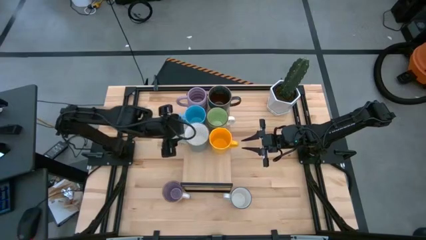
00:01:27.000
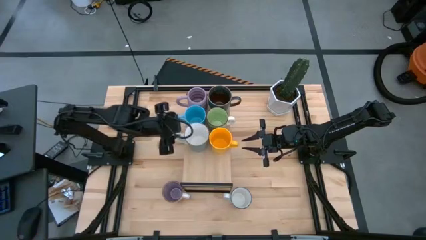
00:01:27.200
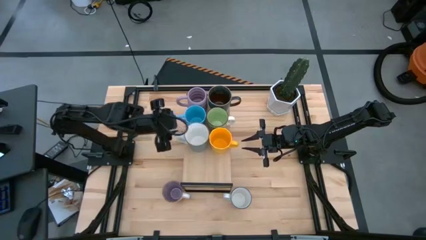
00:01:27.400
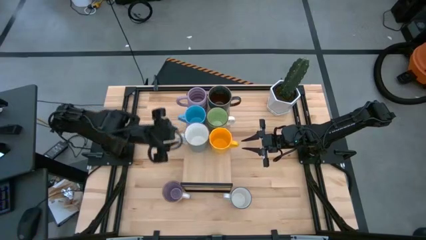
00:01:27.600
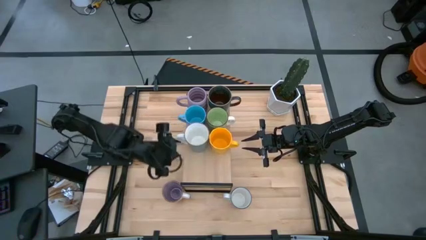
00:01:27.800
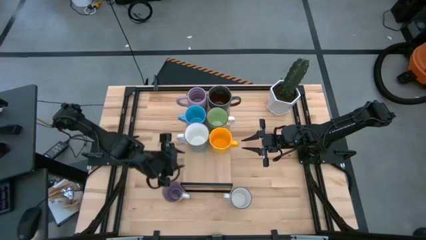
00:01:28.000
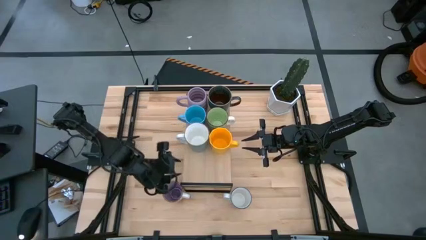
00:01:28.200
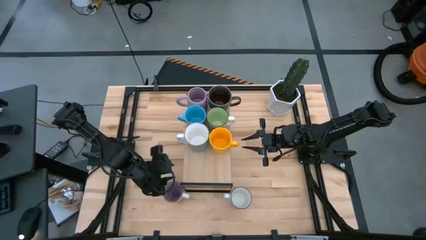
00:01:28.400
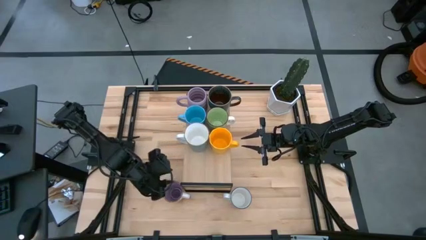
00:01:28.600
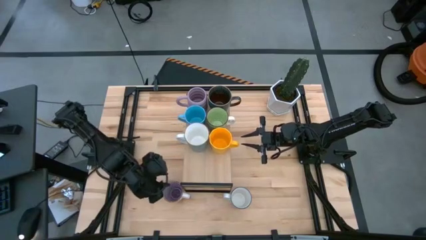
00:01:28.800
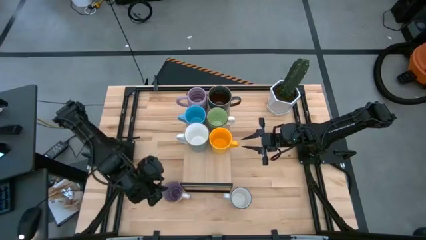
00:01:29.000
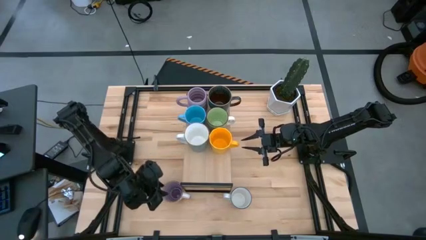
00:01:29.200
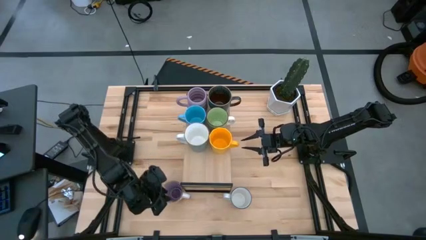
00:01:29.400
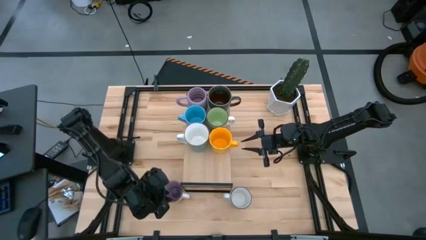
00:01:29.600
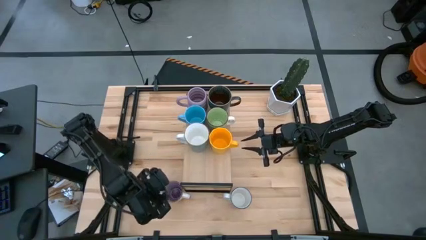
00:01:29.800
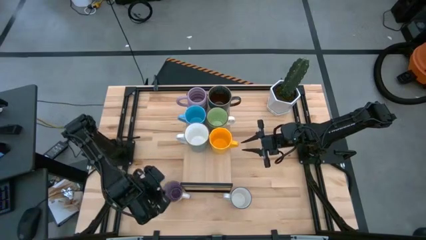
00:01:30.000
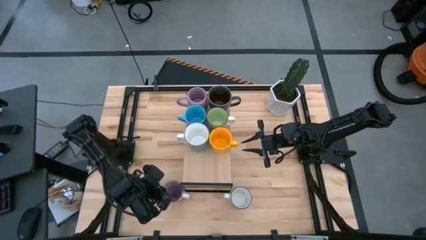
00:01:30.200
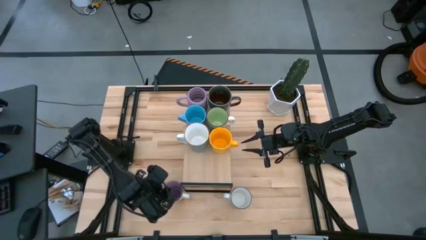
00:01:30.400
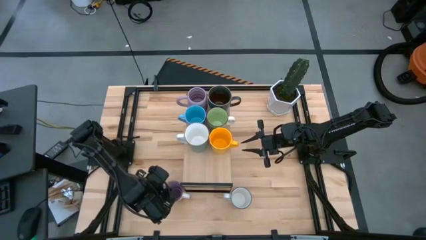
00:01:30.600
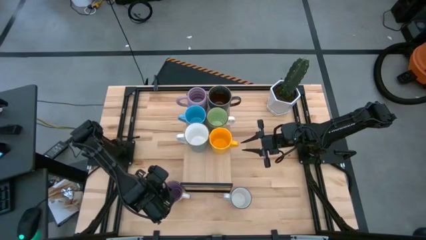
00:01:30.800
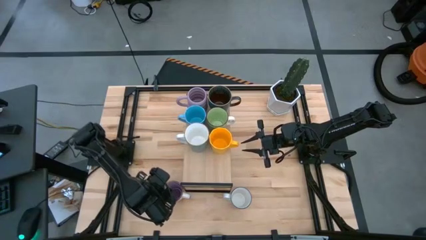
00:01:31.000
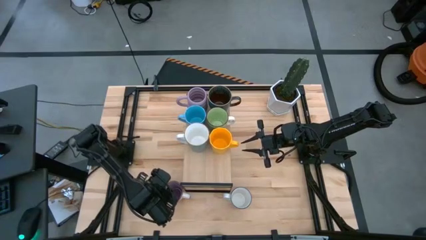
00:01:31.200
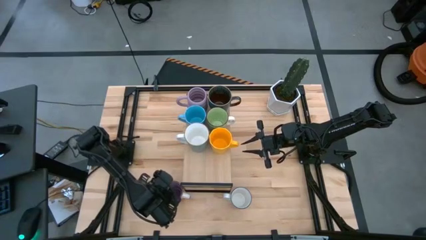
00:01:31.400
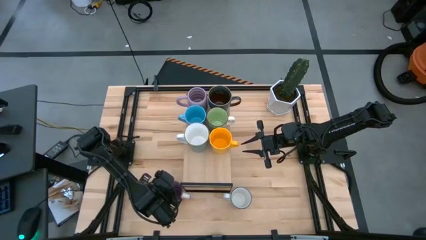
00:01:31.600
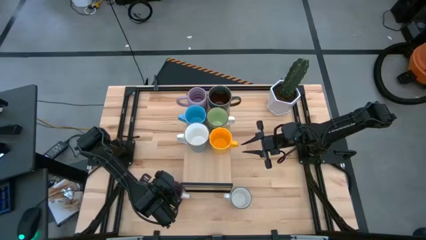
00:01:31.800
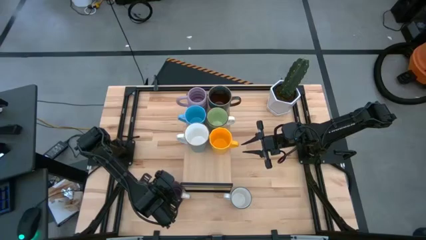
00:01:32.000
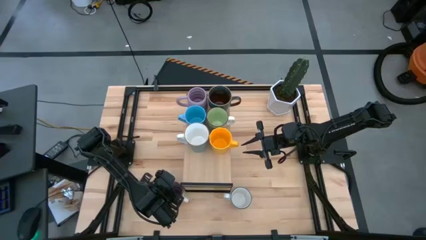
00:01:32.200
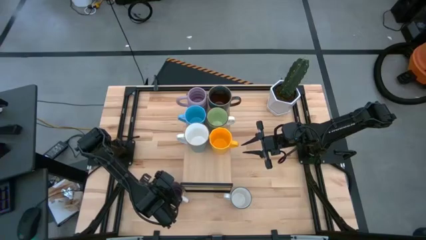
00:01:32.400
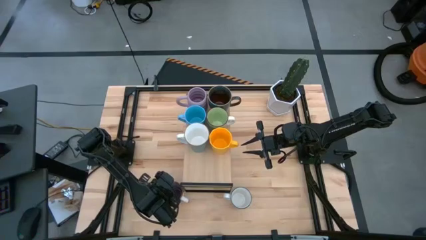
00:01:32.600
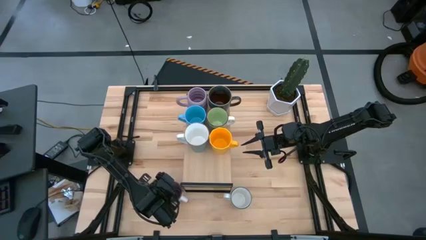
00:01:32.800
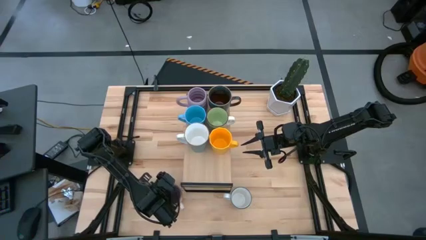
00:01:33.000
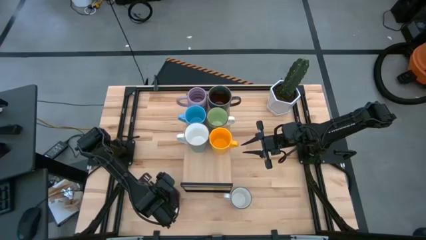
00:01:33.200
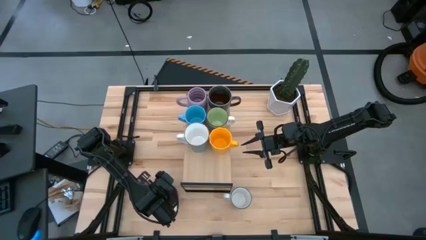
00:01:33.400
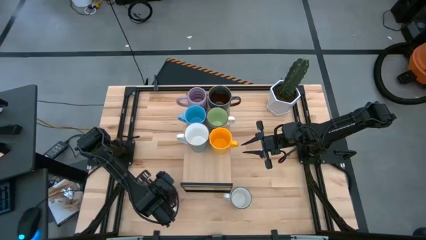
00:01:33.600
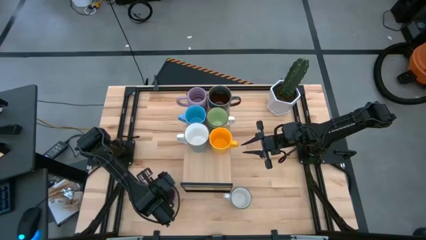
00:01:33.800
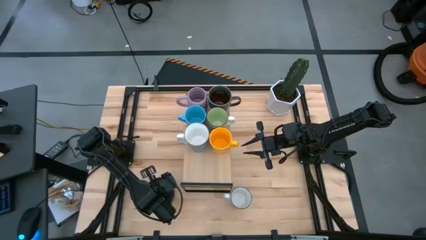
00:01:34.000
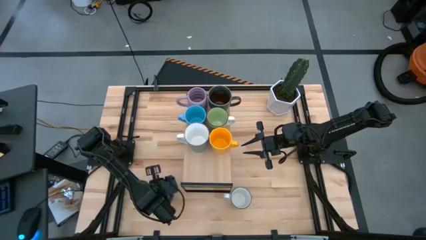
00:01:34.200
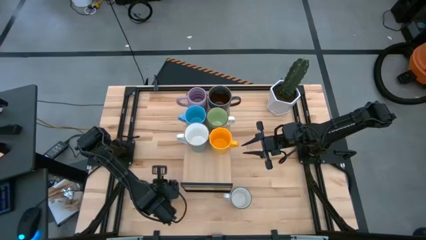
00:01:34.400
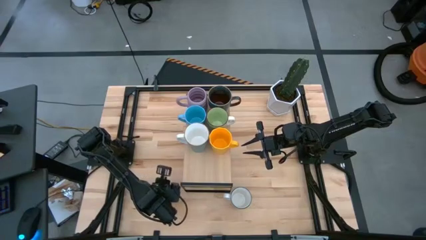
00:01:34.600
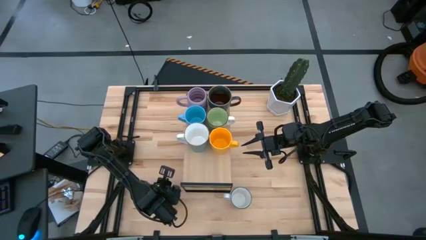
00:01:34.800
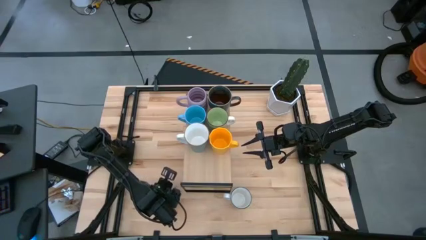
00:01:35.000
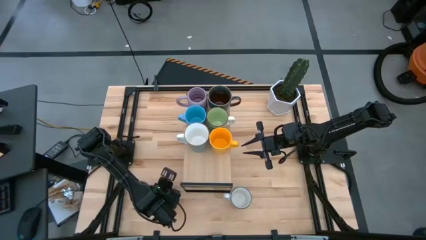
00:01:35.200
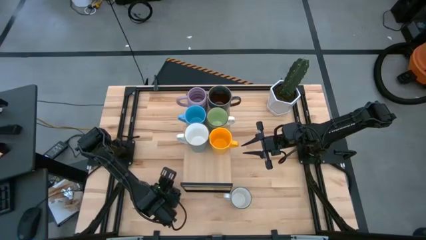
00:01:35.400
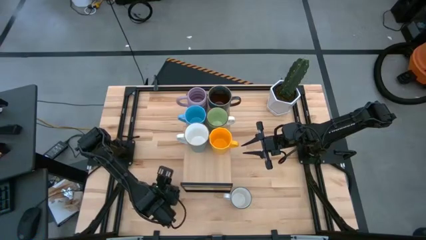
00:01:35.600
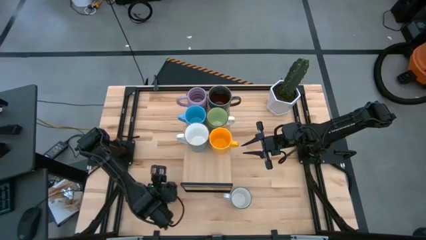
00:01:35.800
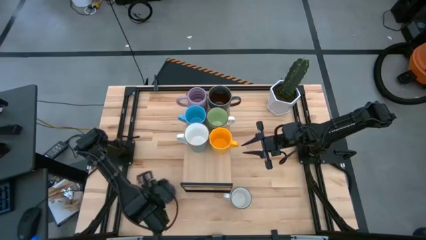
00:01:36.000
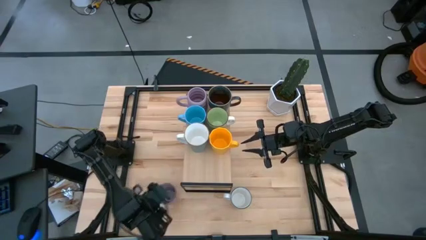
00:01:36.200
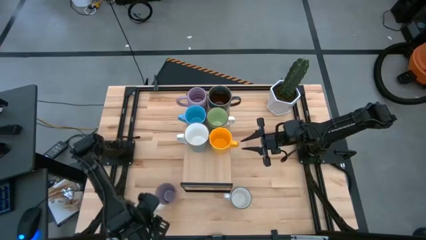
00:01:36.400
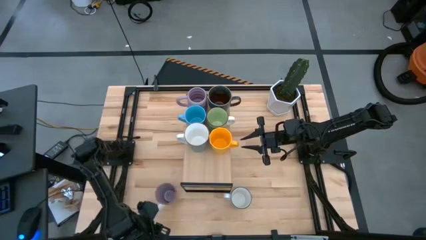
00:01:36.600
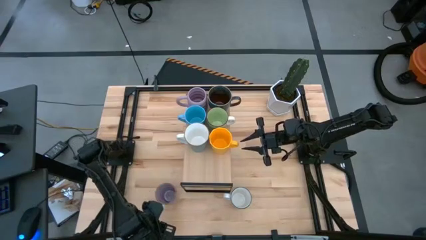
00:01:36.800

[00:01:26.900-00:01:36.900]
Task: Place coffee mugs
Put the purple mug on the shelf

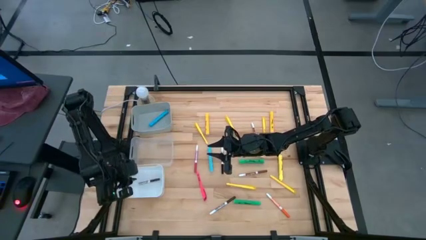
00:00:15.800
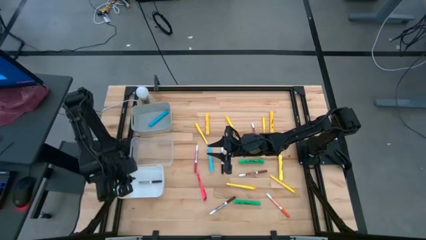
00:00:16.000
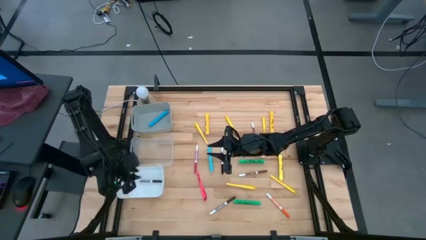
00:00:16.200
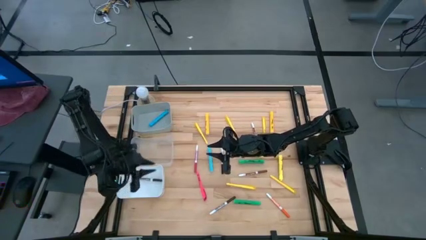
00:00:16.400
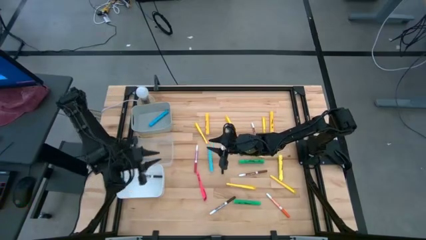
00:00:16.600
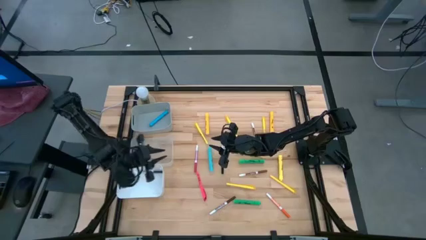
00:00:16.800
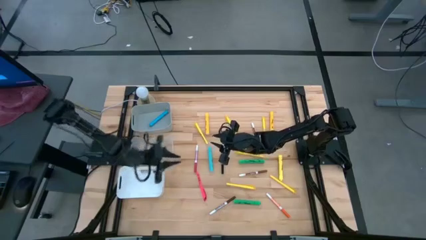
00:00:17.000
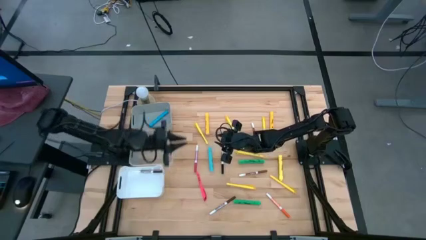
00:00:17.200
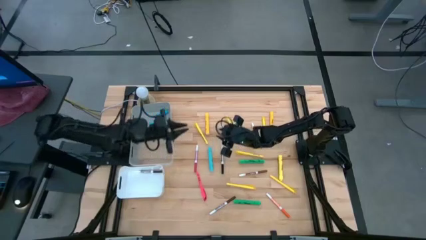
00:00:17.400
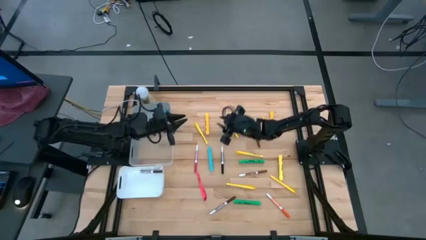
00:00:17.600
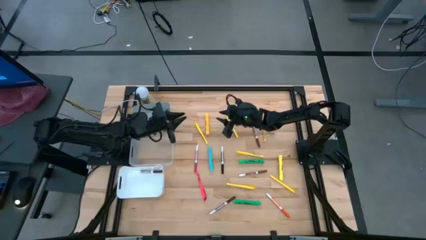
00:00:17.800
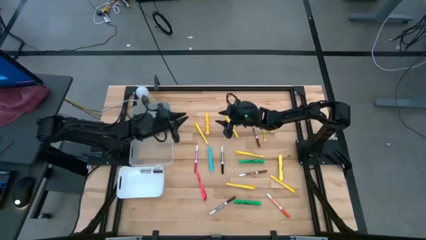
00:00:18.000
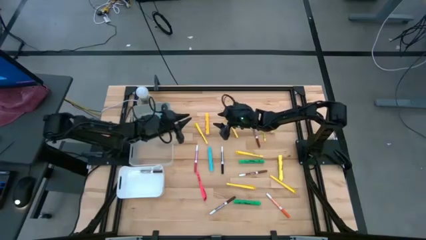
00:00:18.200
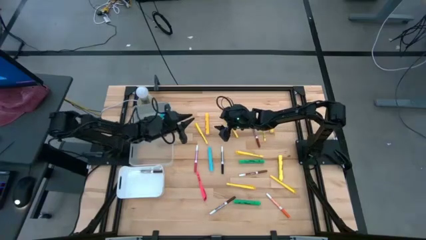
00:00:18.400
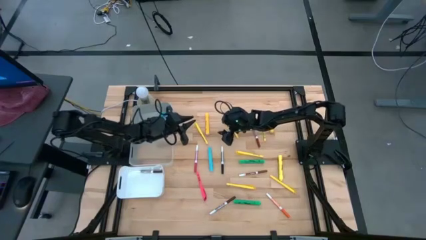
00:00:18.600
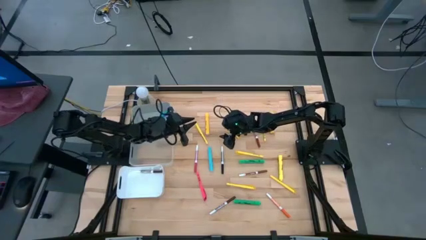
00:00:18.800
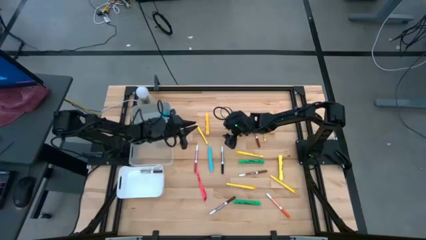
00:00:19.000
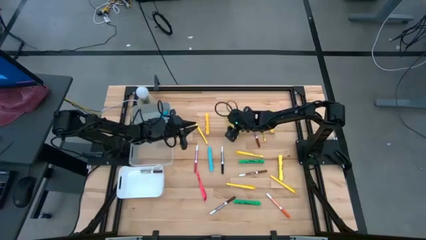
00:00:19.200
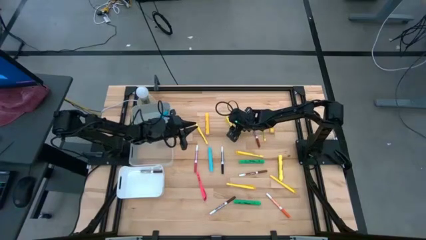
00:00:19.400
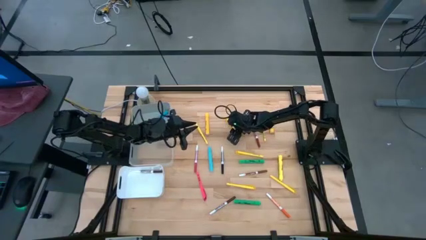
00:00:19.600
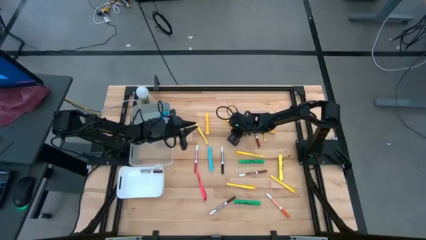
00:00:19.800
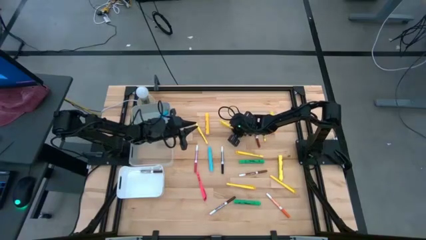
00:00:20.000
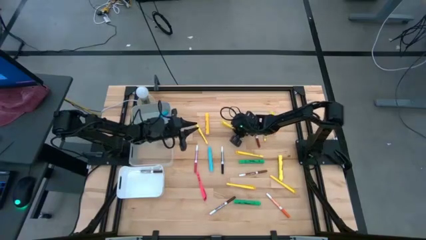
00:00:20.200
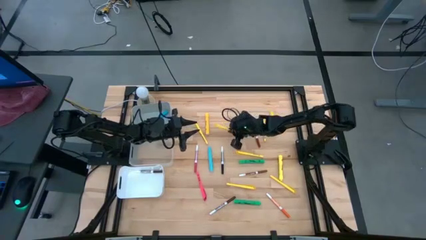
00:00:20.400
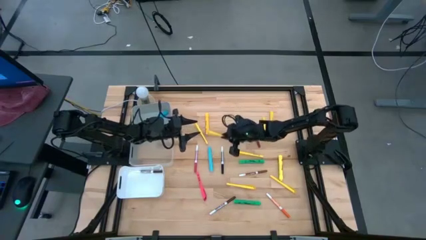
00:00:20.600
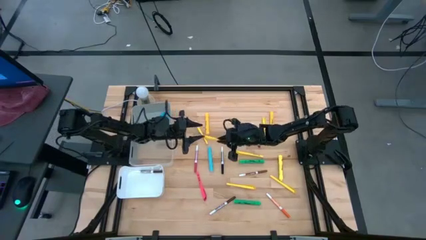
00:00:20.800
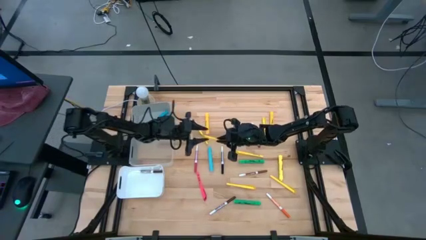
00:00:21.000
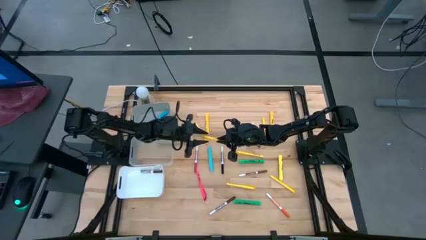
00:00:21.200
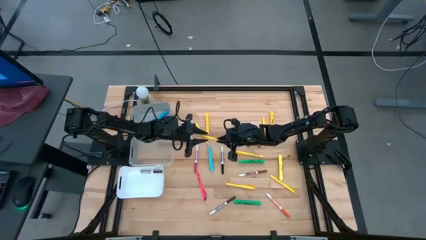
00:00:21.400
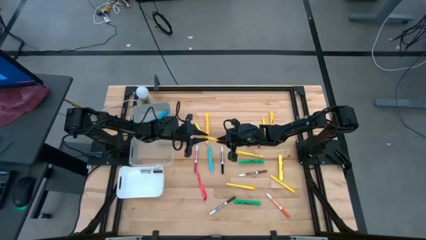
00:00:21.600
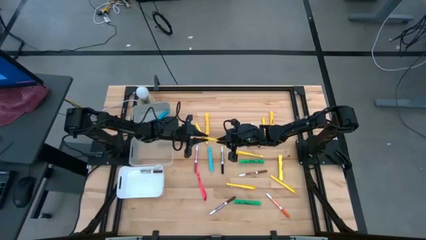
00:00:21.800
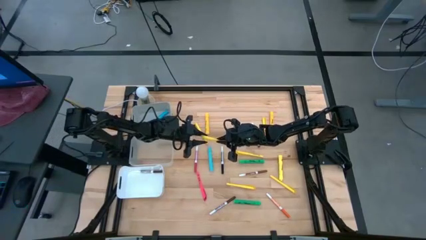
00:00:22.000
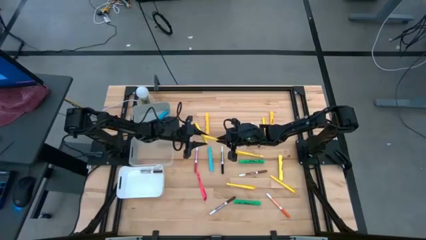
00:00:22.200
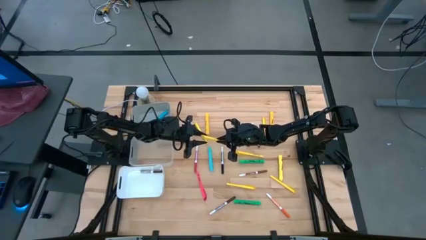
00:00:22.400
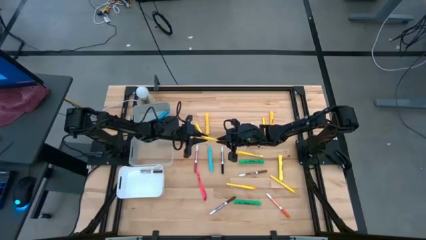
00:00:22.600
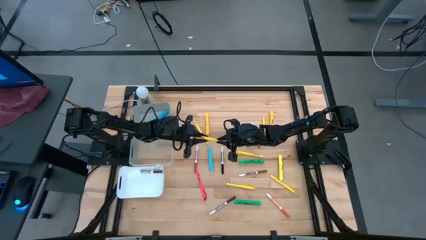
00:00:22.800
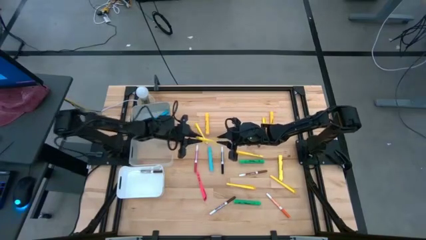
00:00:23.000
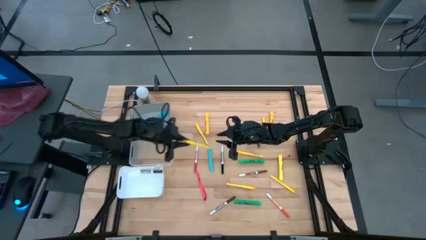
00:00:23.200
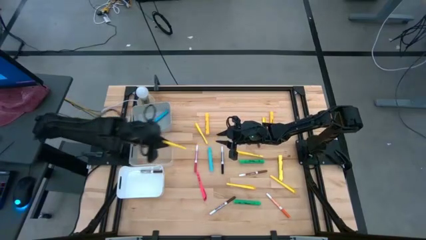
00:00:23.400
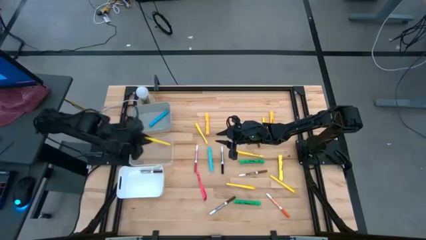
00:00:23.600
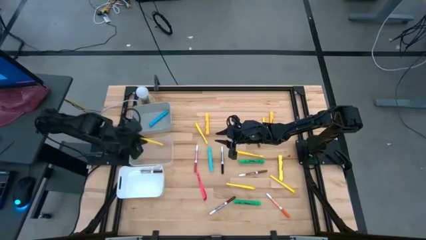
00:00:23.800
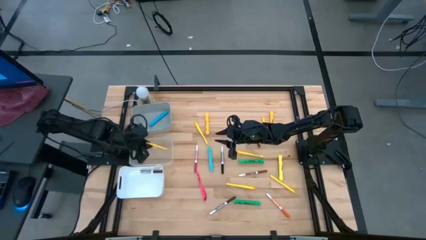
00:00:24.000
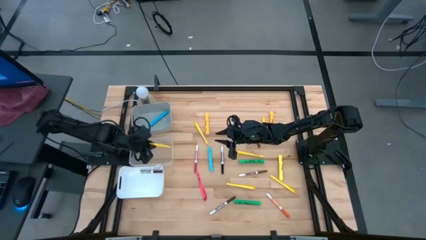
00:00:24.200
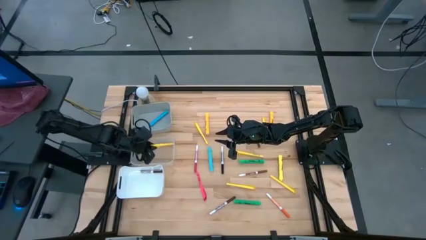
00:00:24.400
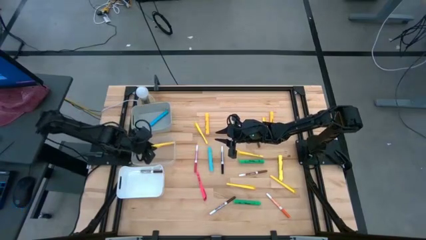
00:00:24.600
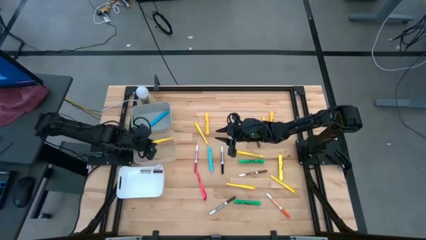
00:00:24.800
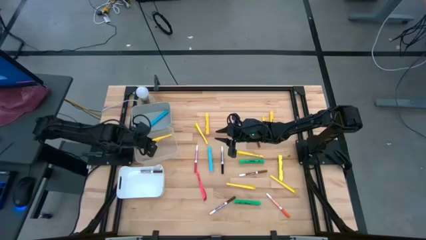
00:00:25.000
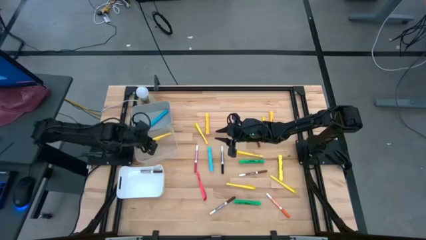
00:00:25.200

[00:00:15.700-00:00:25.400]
Task: Pick & Place Markers
Put the yellow pen into the transparent bin
